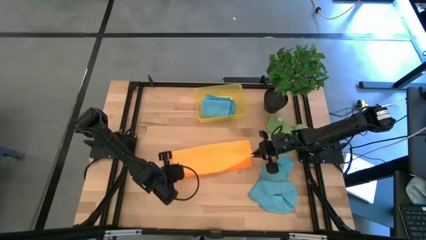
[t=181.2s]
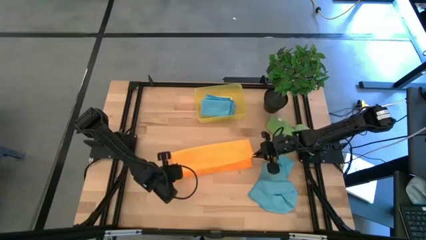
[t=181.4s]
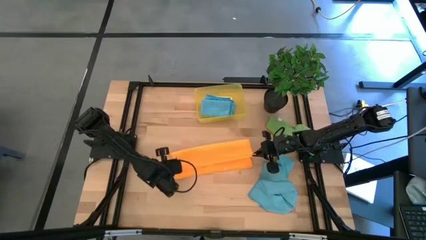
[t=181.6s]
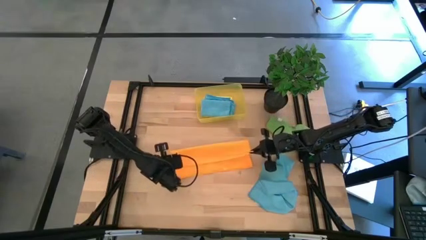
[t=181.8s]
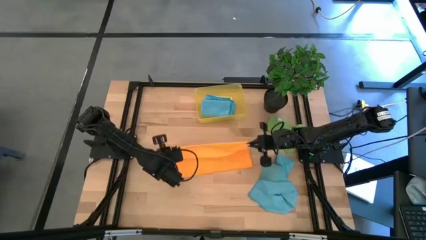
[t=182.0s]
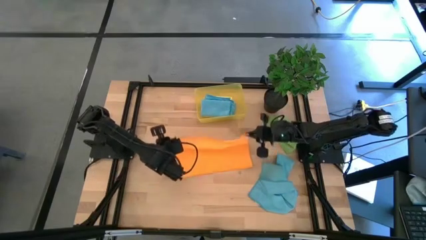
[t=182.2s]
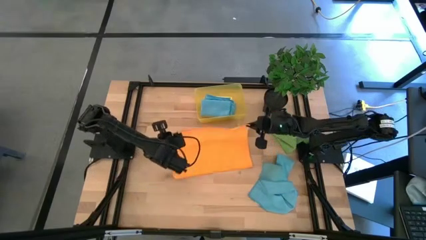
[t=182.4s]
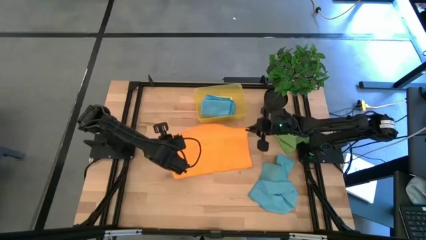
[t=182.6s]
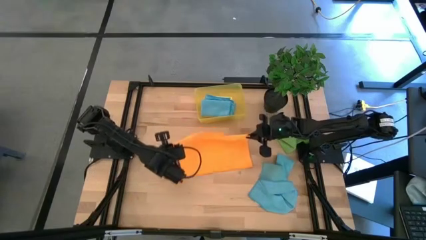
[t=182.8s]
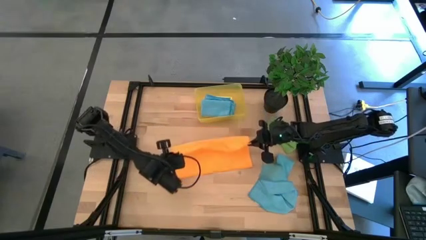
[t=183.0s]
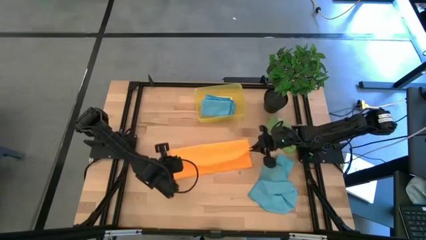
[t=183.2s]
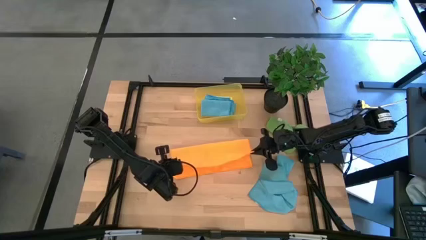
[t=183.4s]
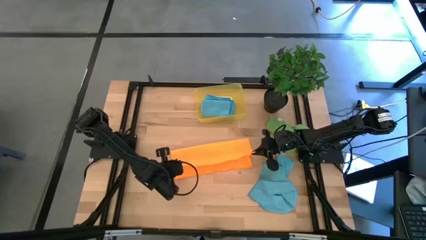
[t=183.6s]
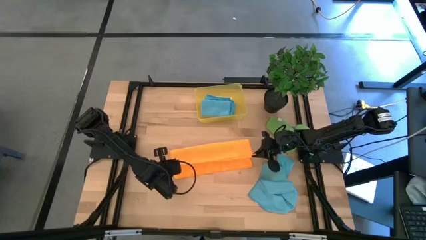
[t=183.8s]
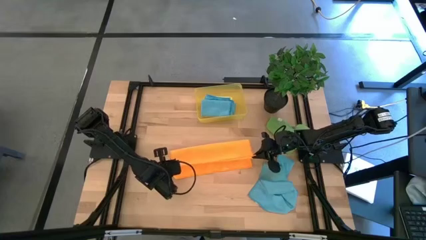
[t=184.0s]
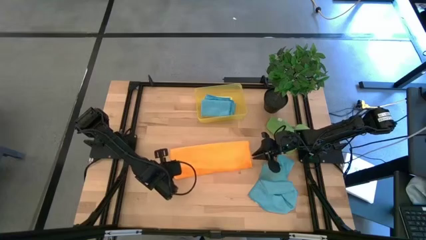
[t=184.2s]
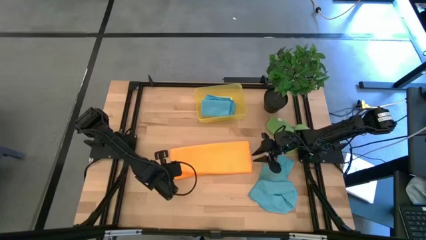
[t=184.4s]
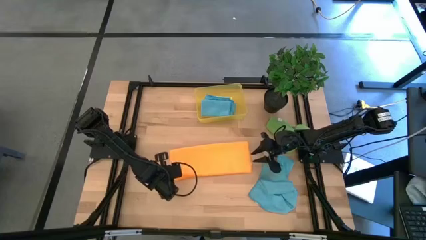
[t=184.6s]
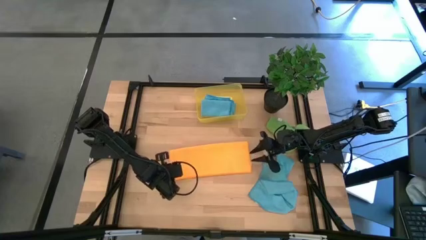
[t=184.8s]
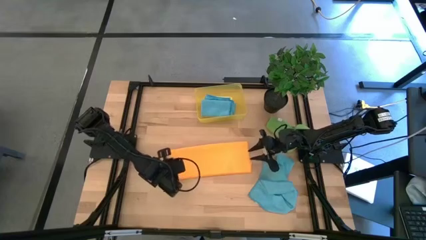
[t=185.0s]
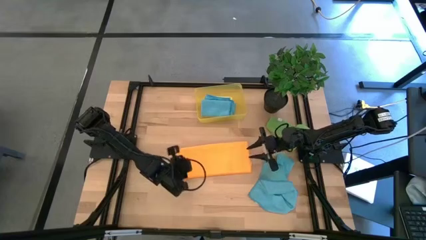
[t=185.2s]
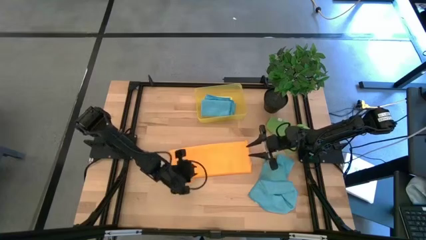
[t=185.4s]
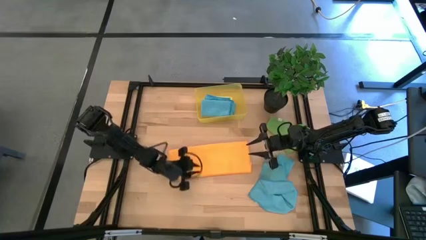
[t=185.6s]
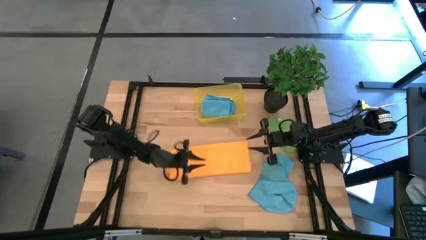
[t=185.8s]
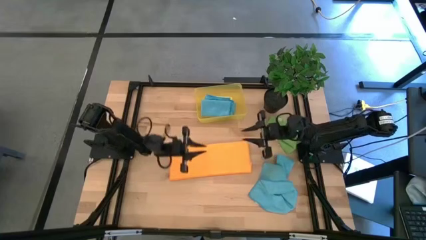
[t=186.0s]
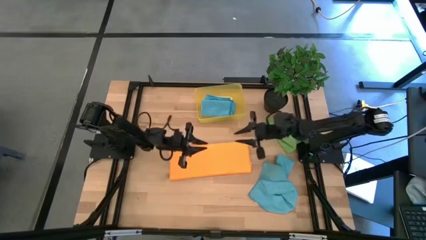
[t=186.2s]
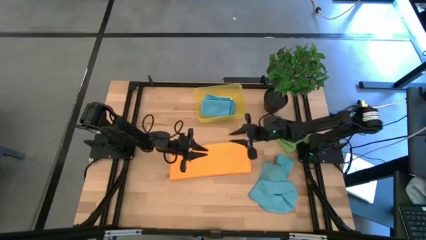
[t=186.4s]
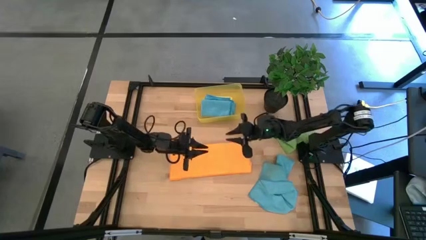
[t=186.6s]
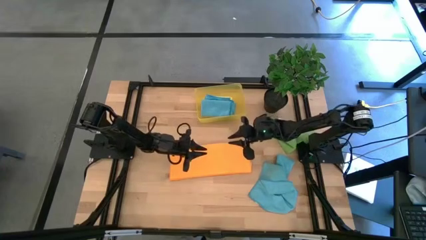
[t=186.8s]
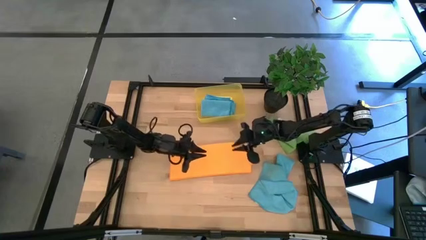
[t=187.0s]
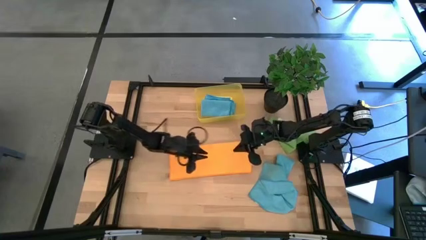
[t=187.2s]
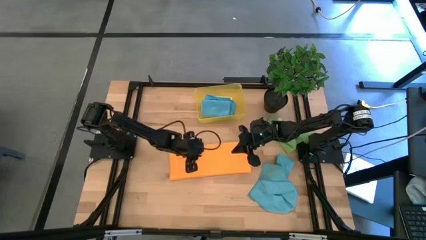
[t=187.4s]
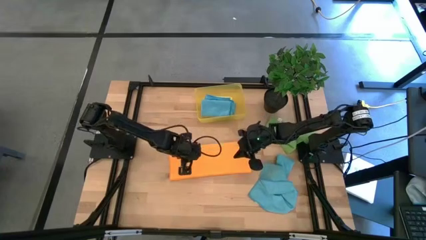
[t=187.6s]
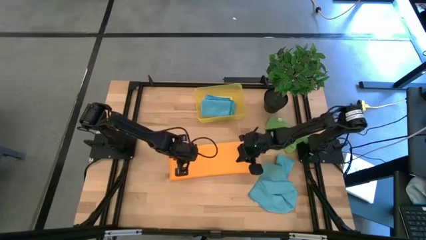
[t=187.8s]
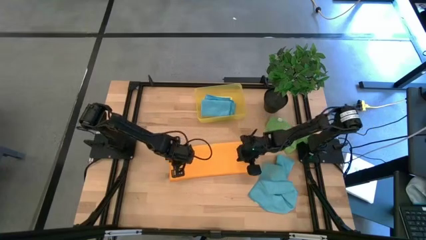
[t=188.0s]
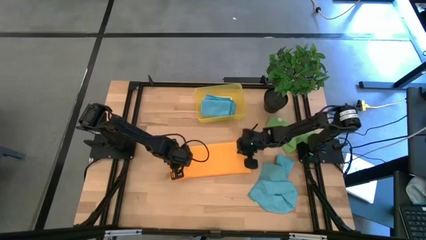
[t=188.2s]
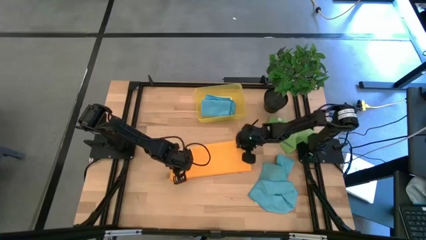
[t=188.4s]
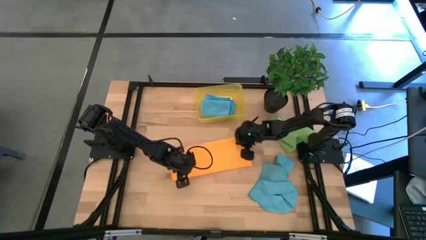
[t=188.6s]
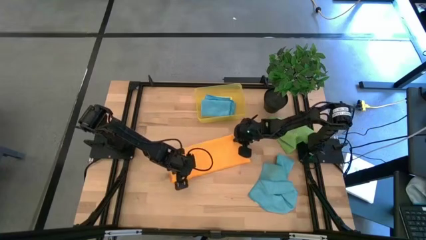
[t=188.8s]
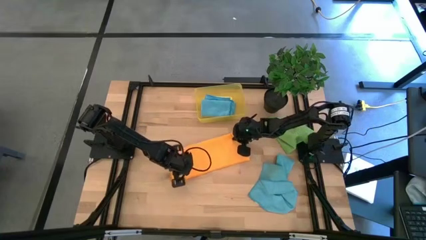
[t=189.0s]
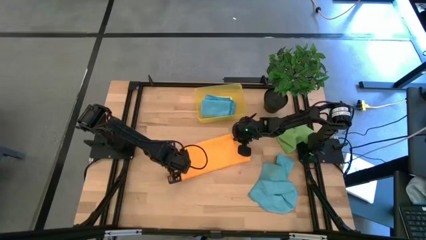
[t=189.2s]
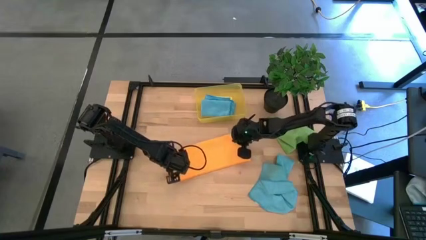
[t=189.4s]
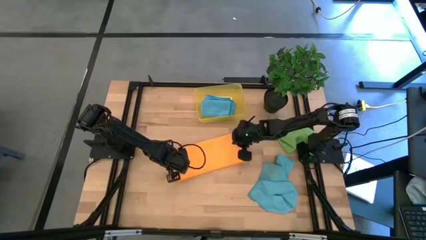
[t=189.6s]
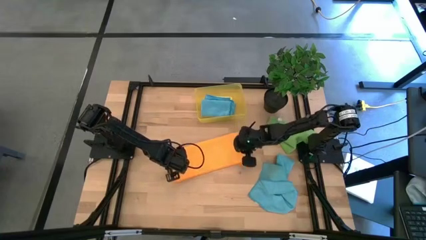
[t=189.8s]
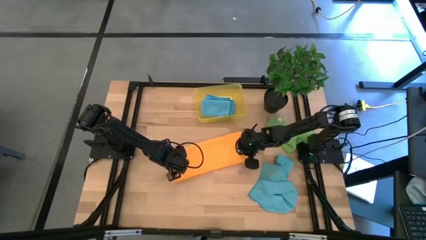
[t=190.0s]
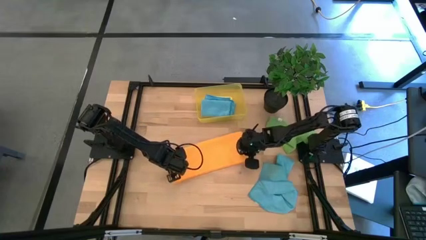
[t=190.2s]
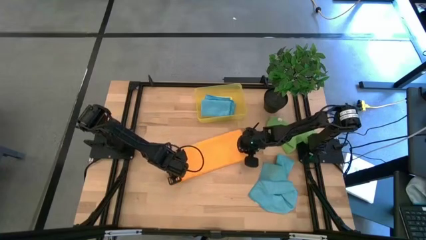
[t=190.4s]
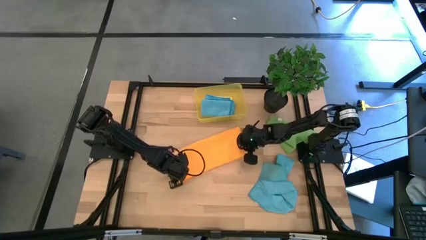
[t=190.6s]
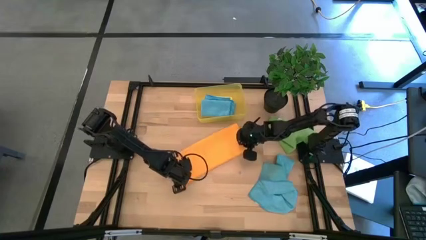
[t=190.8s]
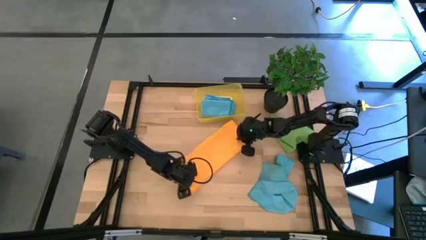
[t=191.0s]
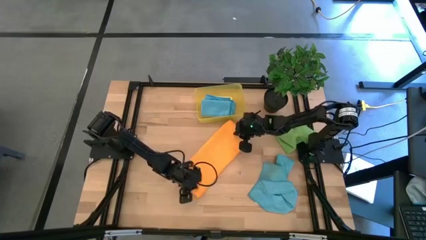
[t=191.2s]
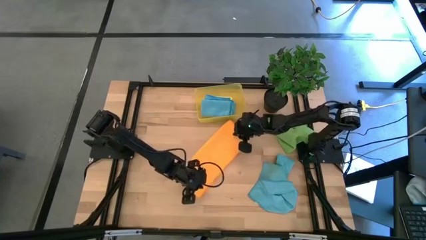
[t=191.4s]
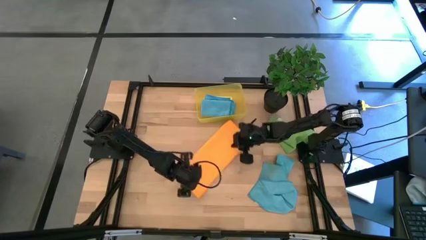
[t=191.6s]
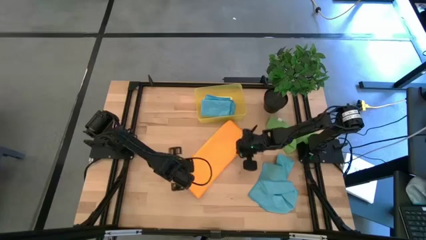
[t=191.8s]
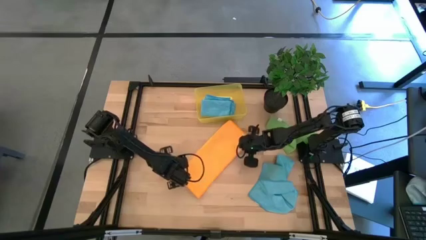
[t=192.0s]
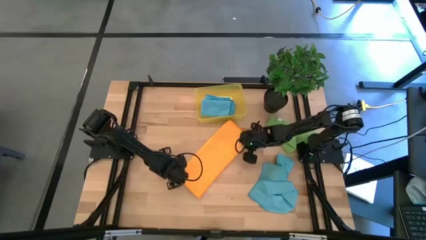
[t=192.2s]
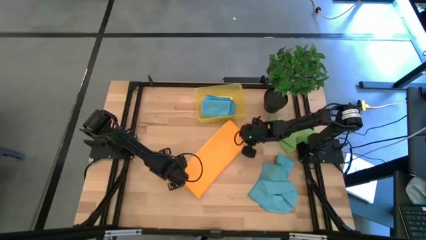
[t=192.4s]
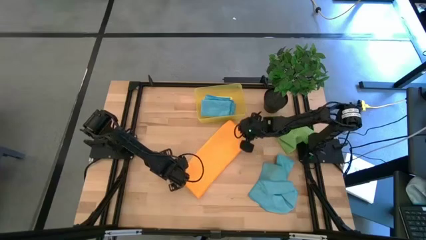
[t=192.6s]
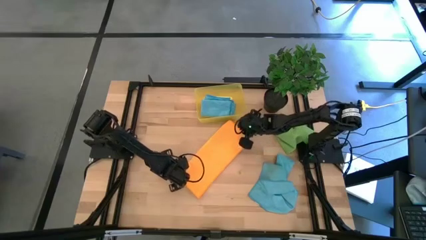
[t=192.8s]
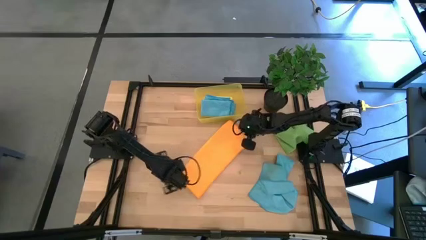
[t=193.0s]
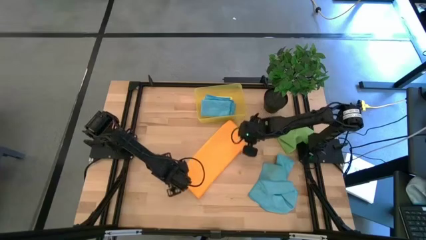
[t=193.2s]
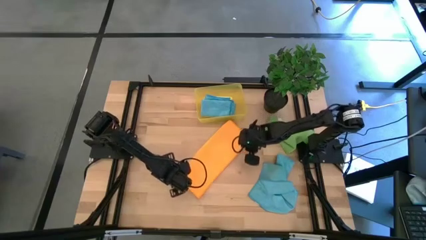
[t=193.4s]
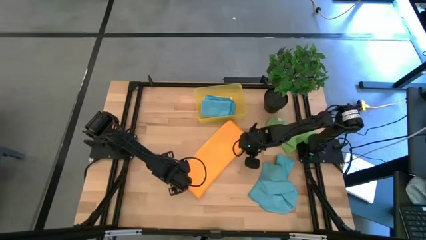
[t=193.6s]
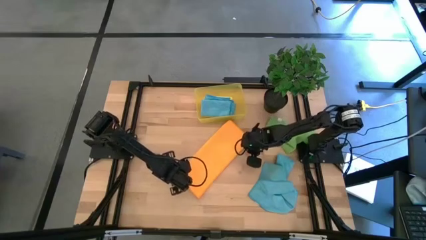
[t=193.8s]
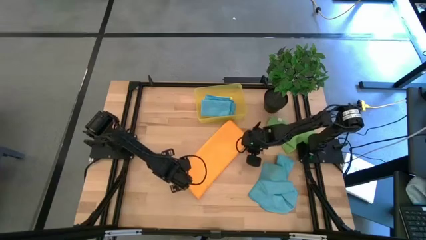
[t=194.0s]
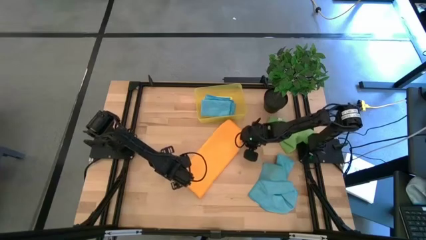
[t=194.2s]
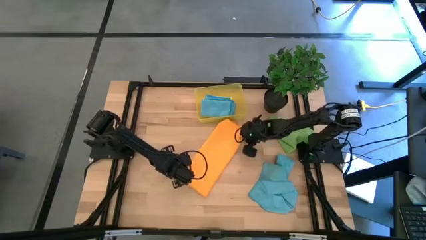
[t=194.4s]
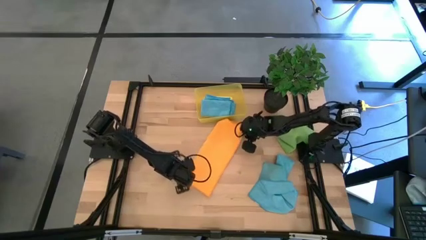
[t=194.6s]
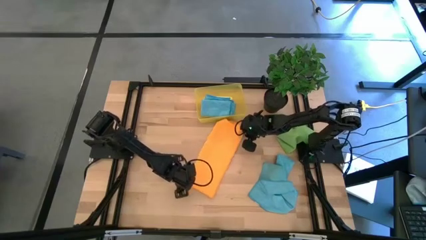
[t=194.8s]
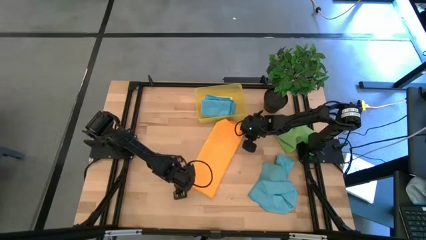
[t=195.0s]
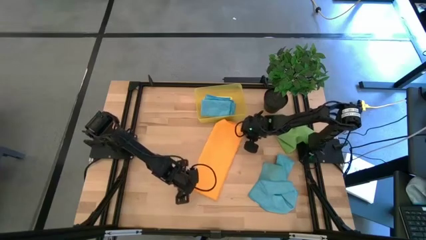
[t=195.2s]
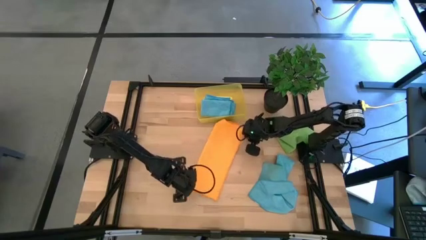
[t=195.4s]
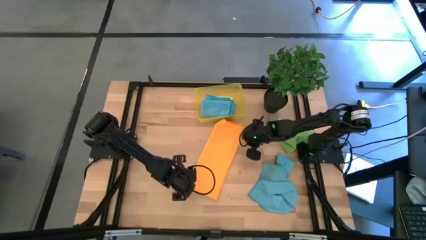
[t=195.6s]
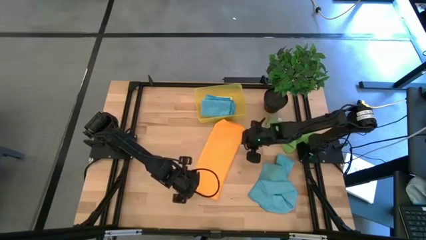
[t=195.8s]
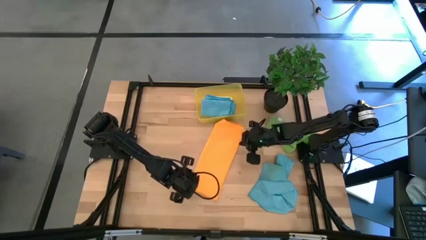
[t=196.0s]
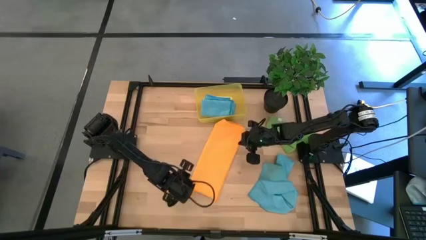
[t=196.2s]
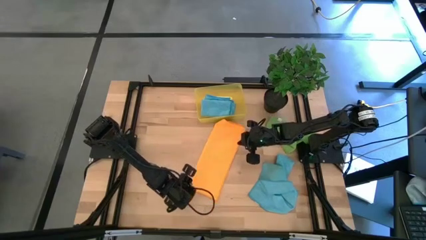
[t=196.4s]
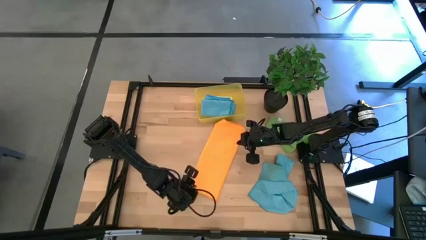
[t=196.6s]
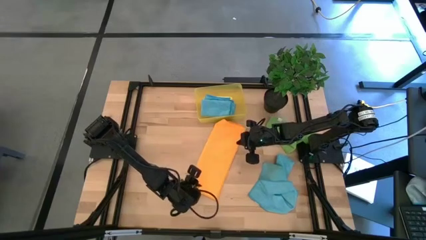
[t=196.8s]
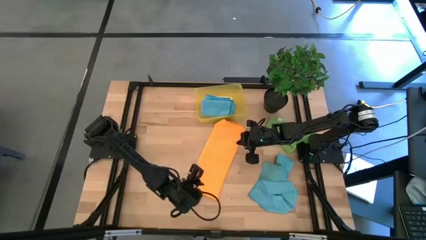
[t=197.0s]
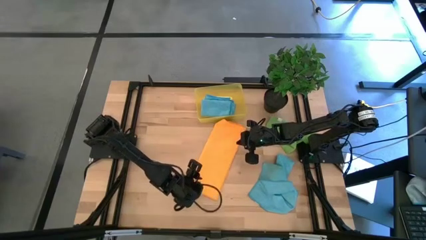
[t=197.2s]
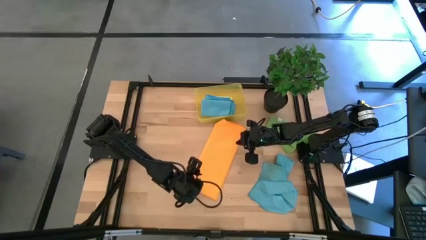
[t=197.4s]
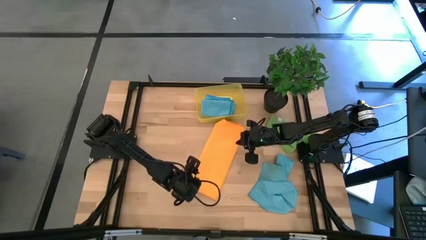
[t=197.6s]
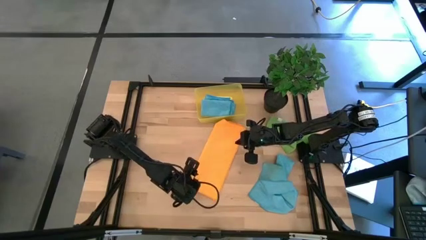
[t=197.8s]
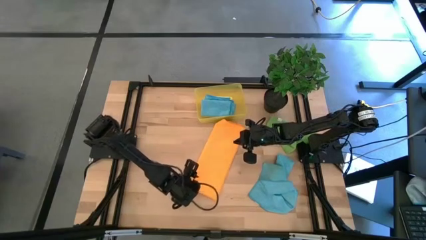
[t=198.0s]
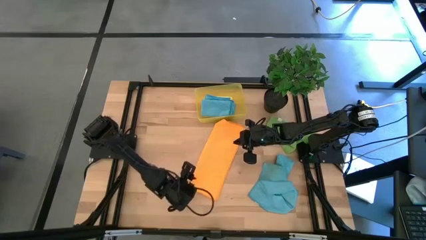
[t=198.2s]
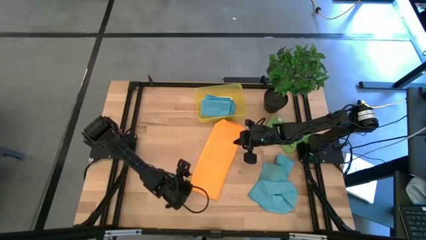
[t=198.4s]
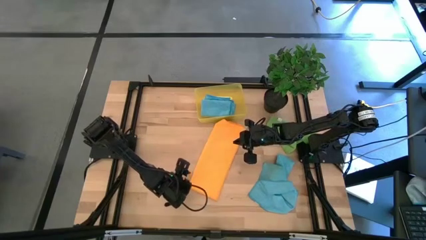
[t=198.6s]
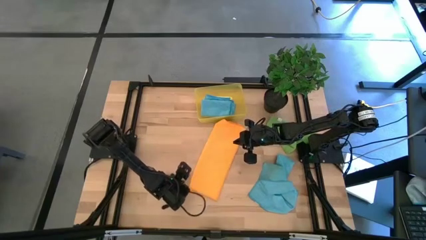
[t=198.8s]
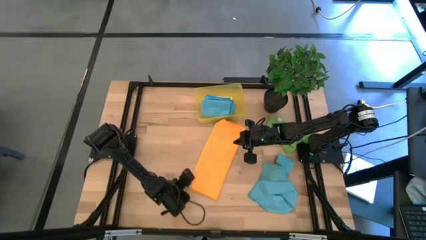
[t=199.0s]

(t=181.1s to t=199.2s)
Task: Fold microfiber towels
Fold the orange microfiber towel
